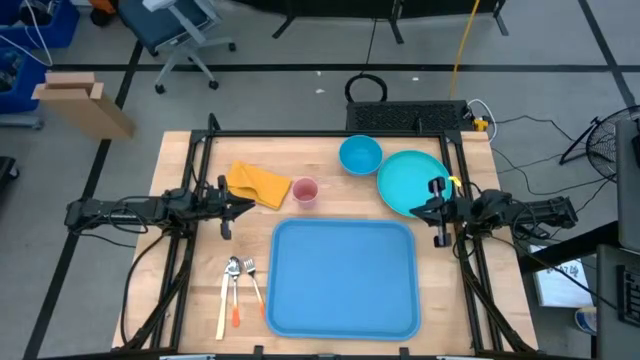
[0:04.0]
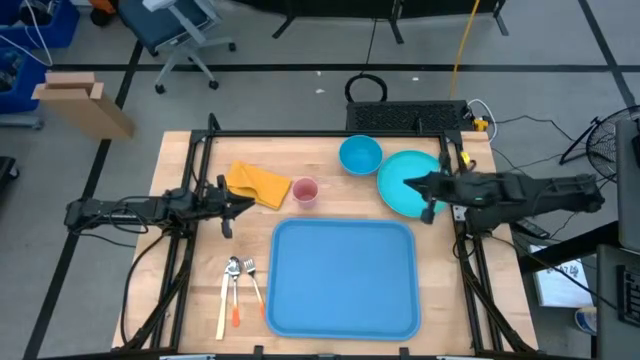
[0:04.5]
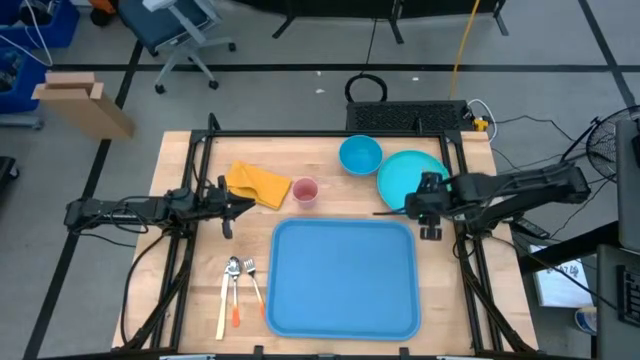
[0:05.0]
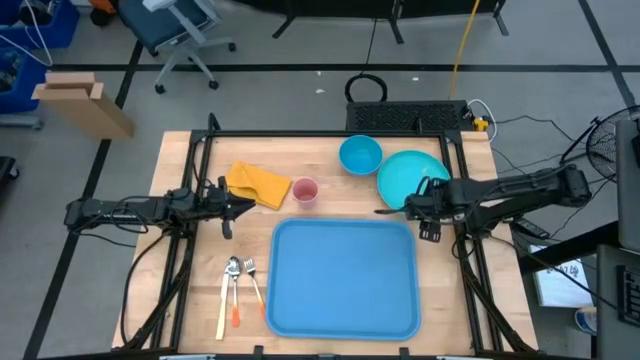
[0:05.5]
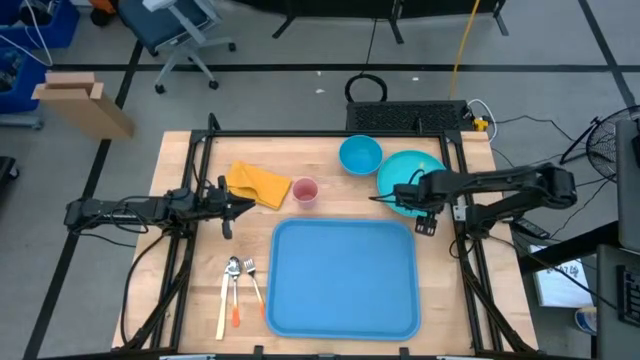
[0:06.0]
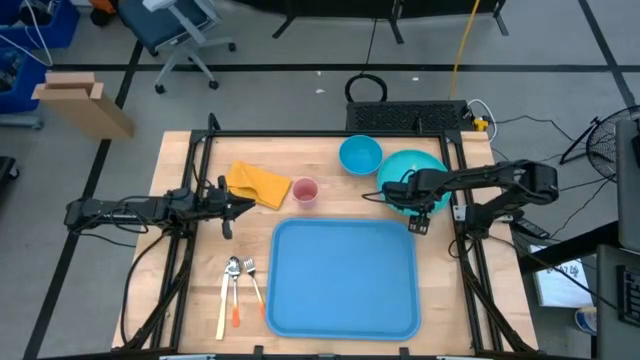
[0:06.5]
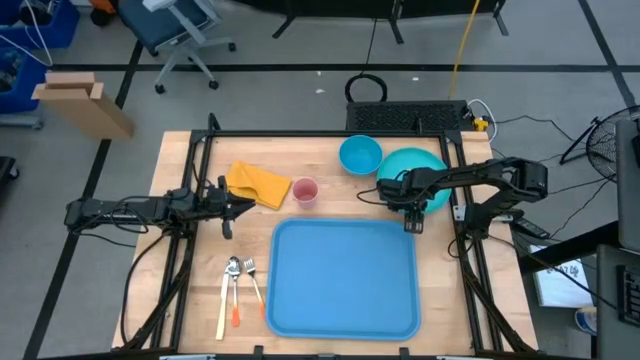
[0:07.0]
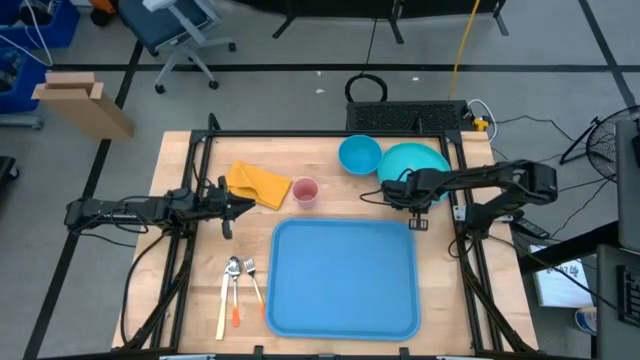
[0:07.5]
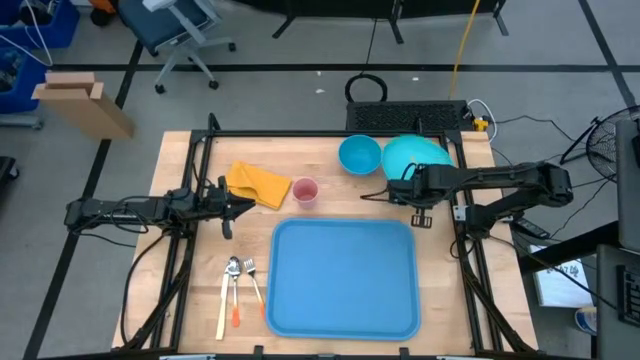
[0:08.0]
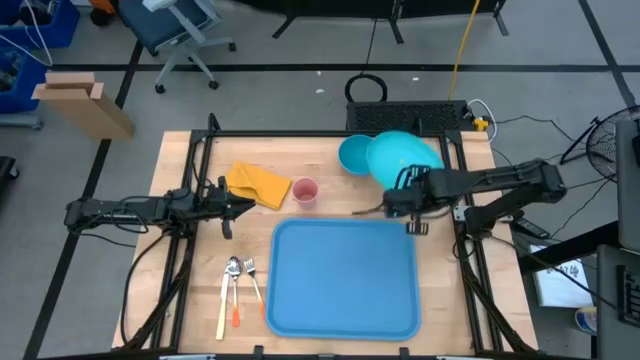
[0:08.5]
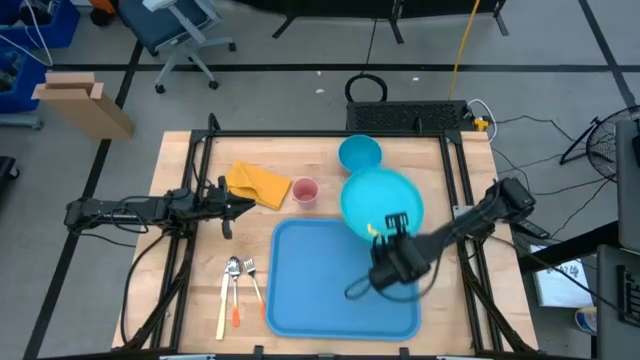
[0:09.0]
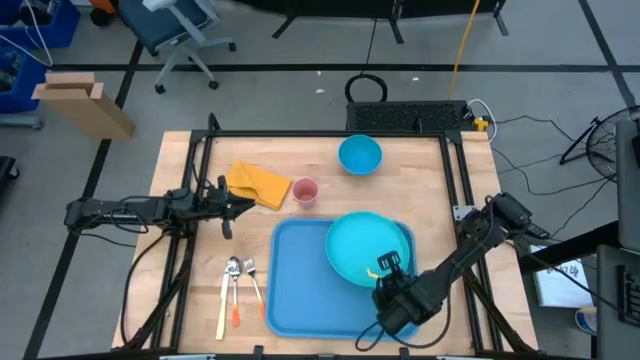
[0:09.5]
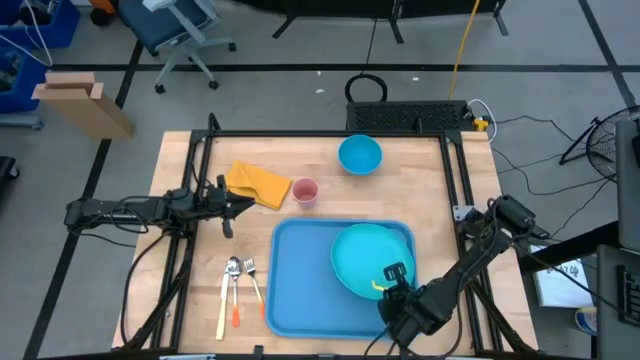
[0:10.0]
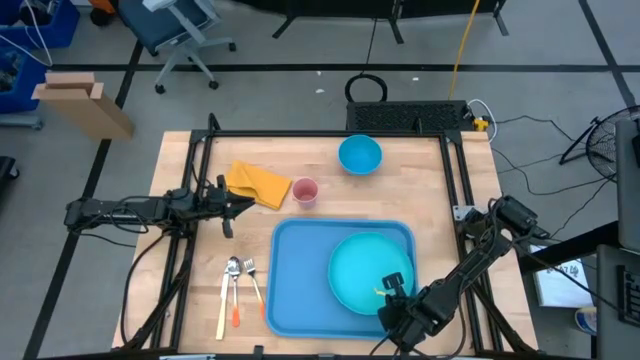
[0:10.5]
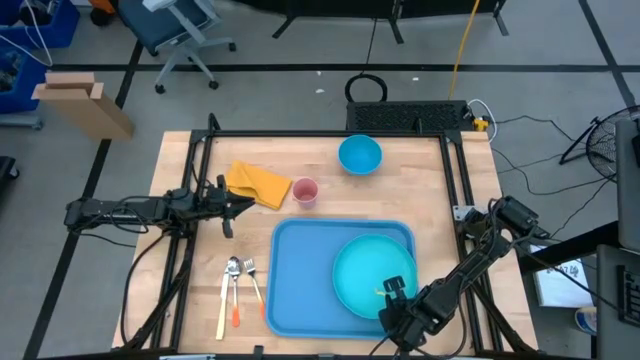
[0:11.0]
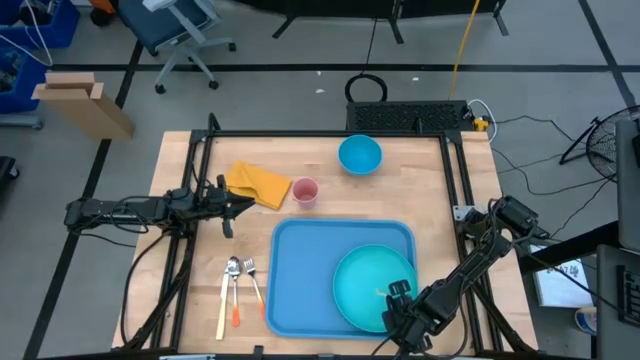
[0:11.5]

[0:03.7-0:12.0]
Task: Set up tray
Put the green plate on the blue tray

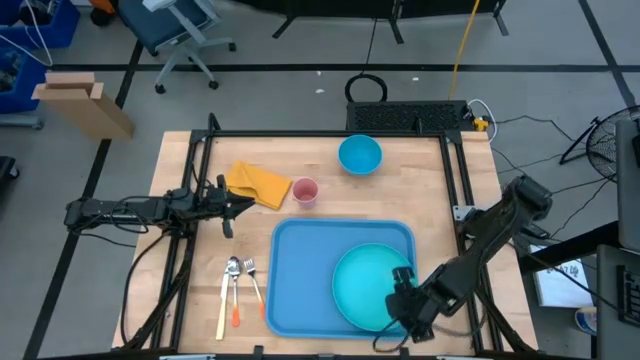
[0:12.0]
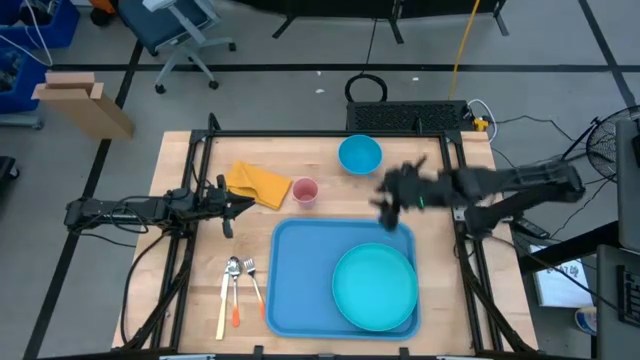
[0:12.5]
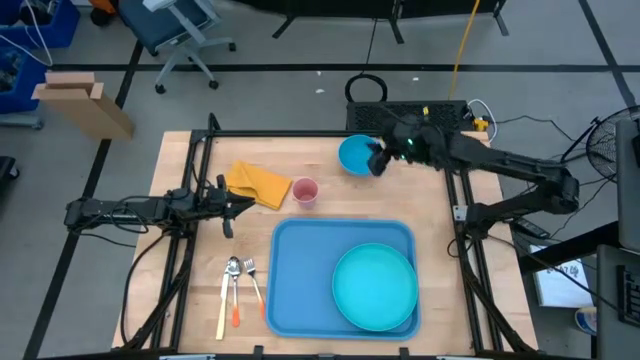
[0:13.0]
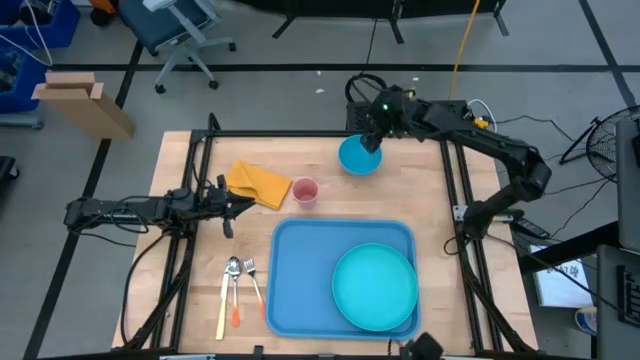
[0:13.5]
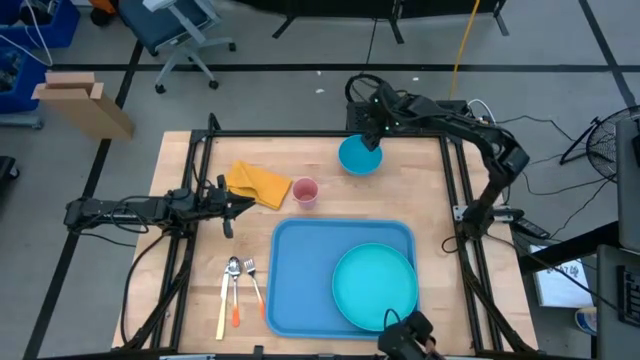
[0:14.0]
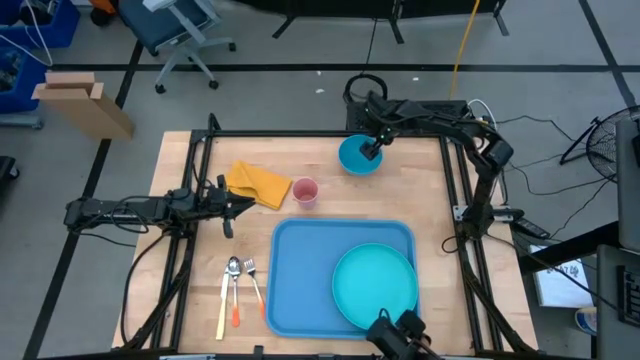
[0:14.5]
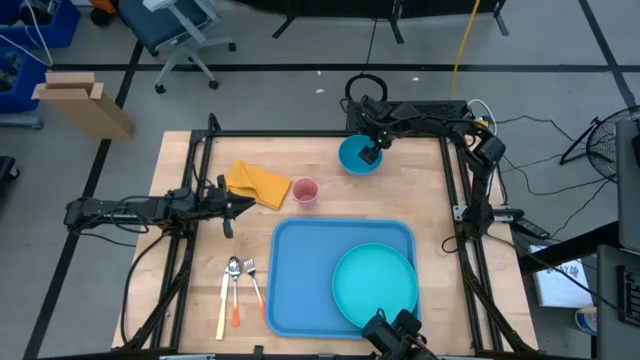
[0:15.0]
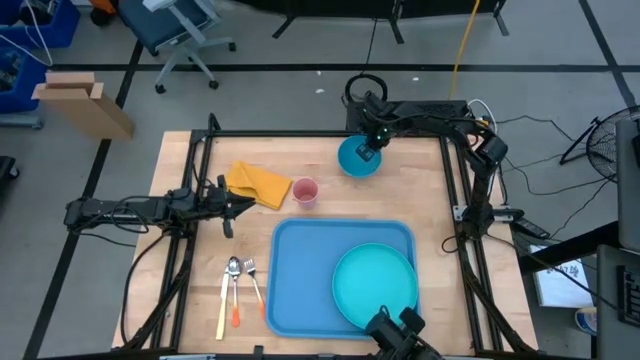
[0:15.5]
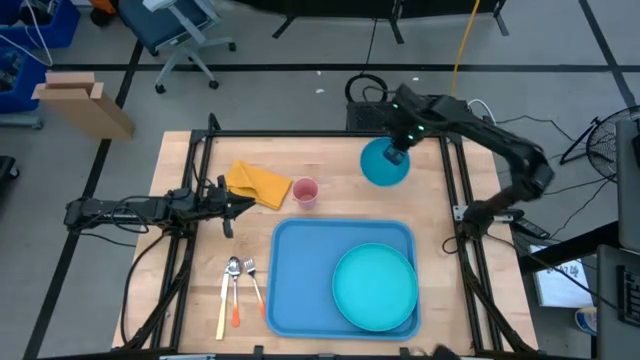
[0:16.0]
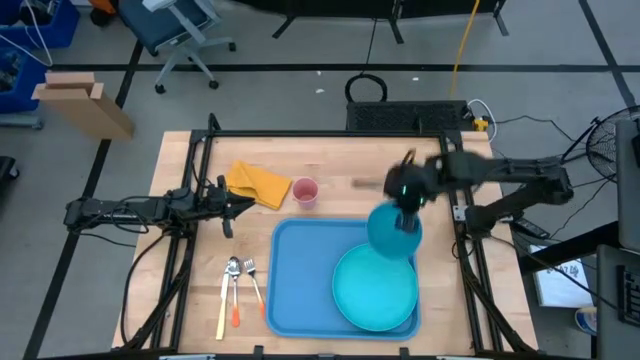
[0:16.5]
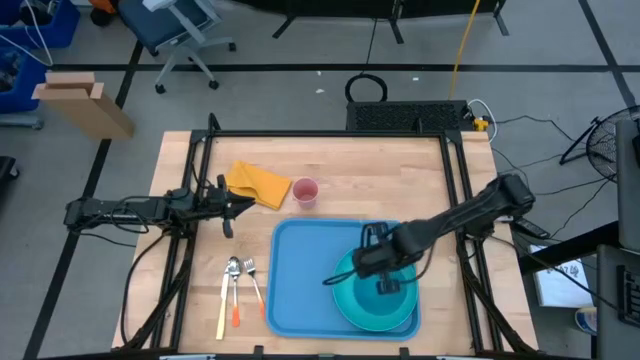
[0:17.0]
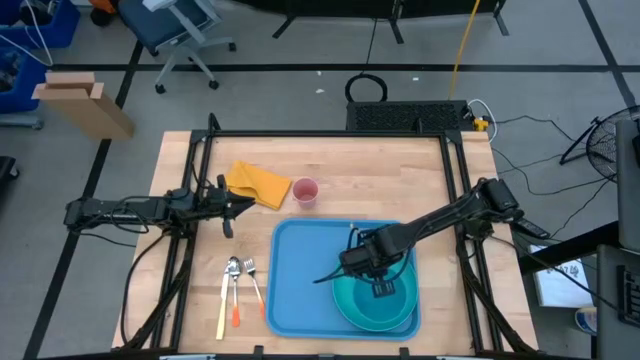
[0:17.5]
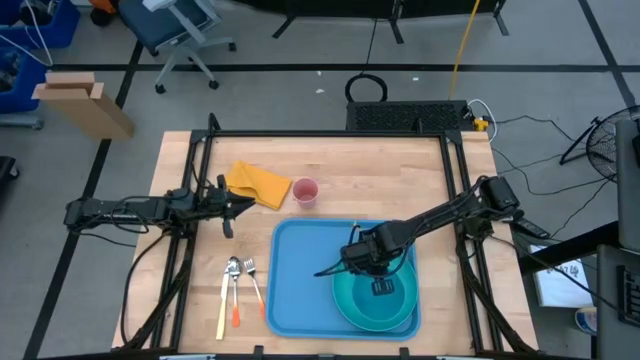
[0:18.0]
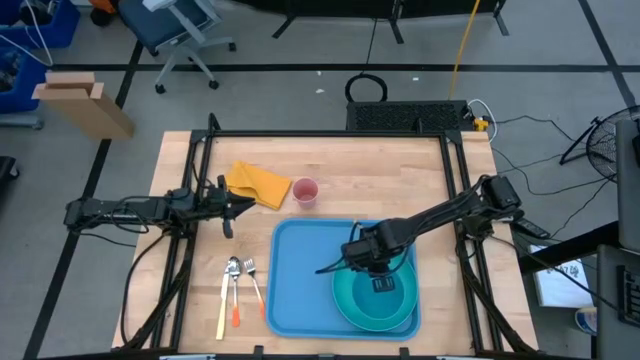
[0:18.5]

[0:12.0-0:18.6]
Put the blue bowl on the green plate

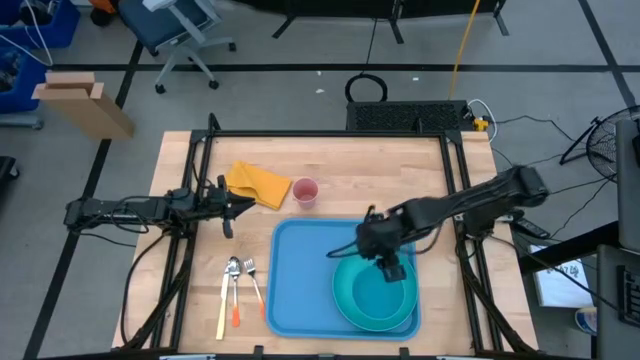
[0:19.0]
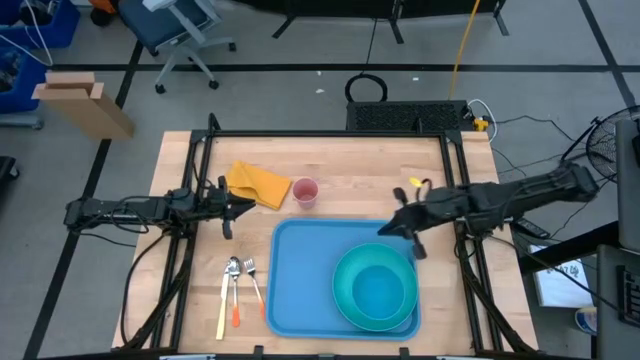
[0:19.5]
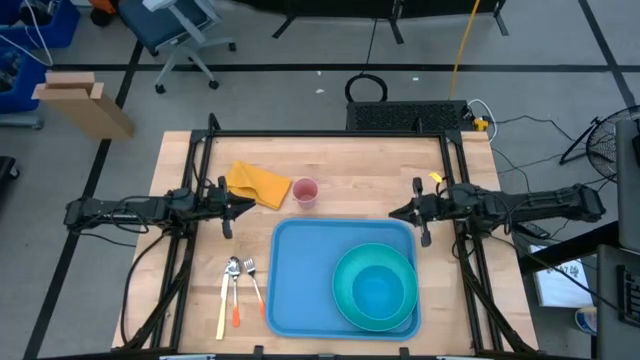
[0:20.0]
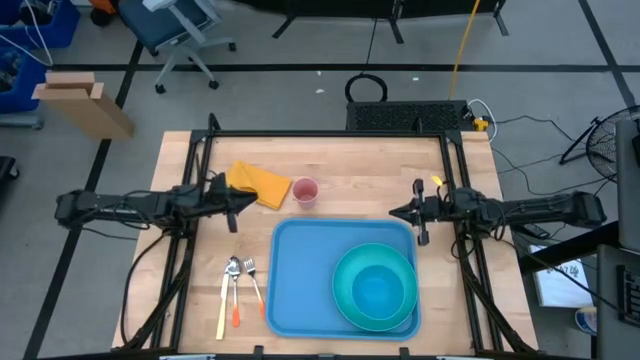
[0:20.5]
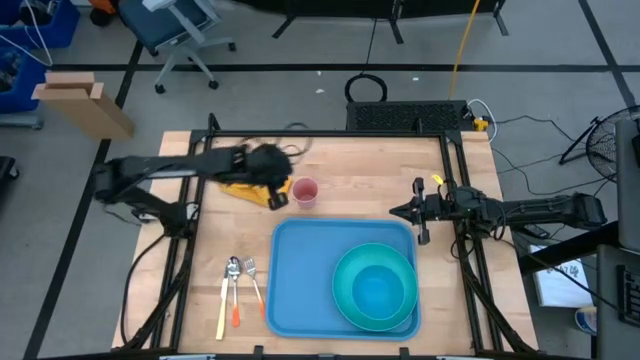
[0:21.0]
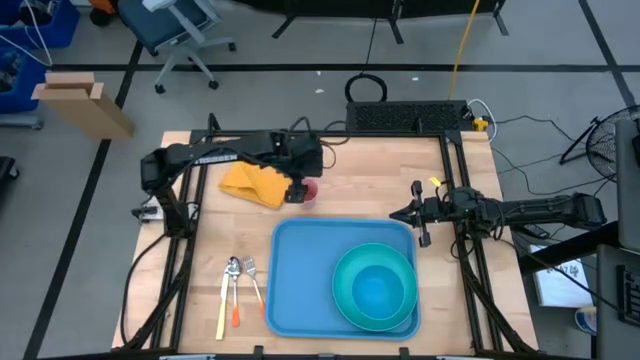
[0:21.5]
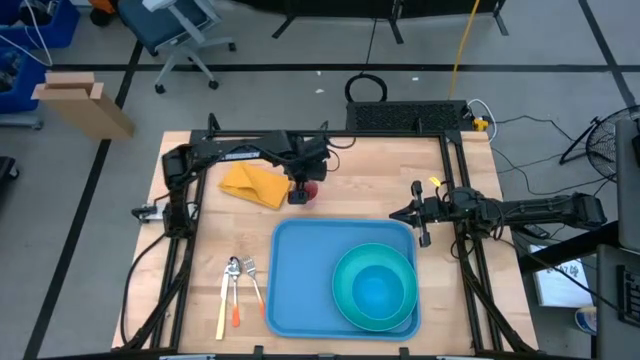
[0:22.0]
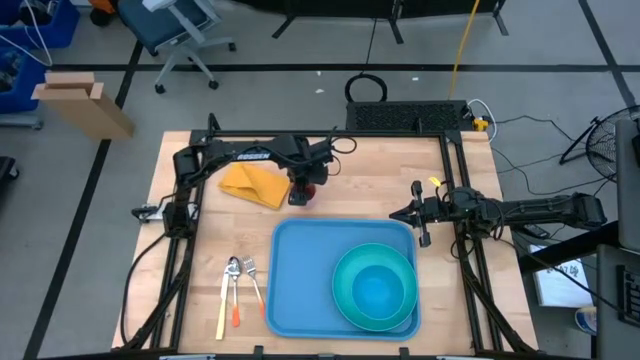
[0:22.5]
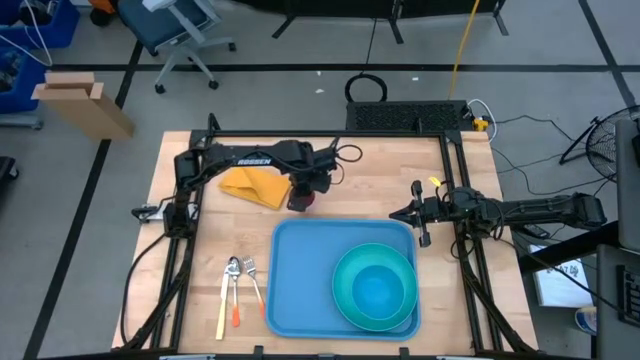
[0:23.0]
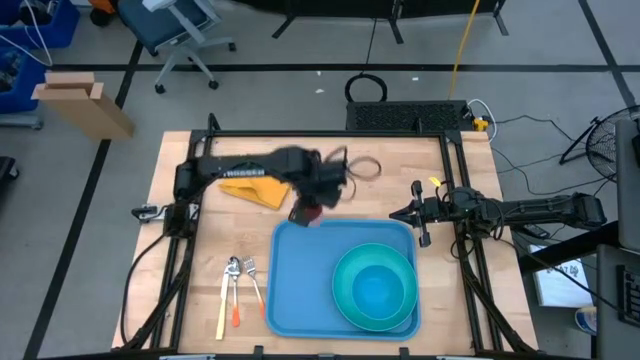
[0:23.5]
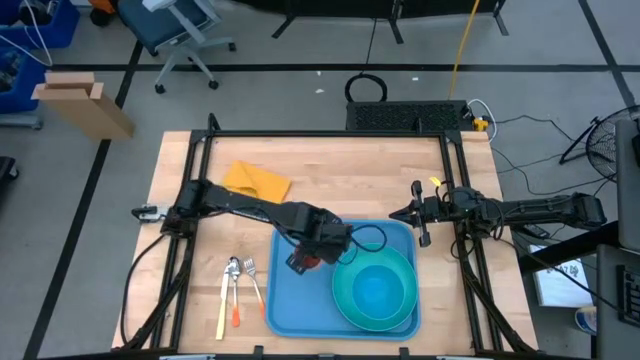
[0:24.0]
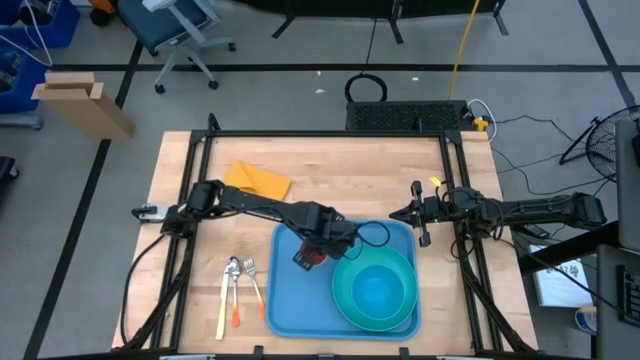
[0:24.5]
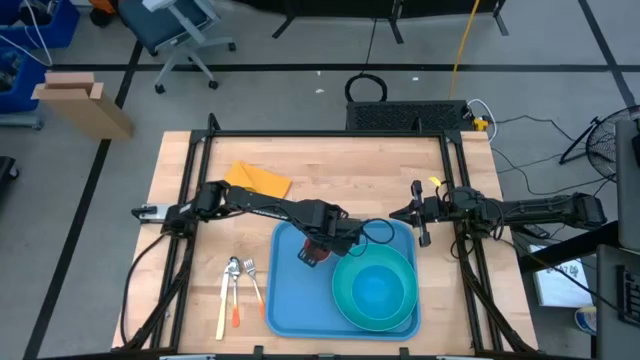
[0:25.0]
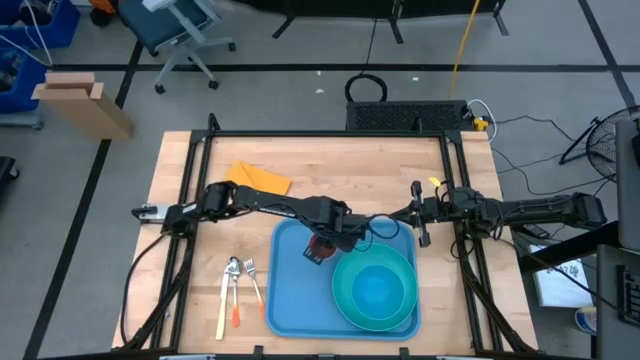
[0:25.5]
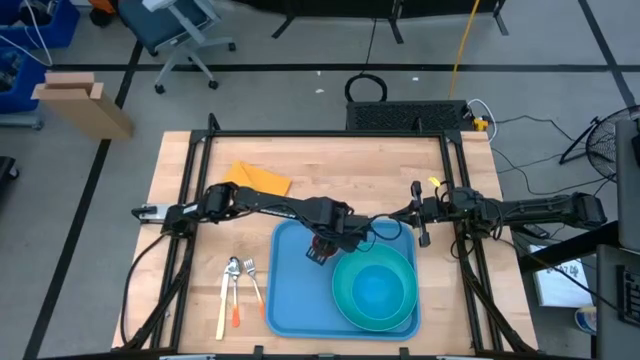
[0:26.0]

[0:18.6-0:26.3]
Put the pink cup on the blue tray
